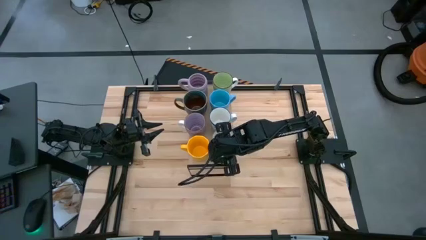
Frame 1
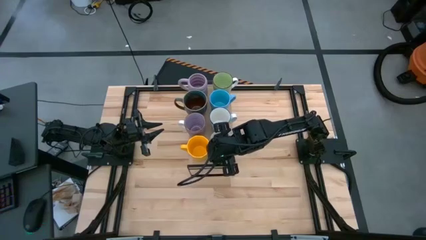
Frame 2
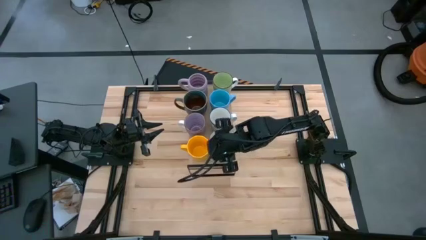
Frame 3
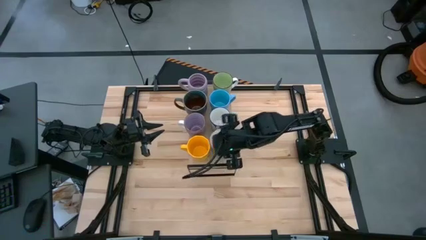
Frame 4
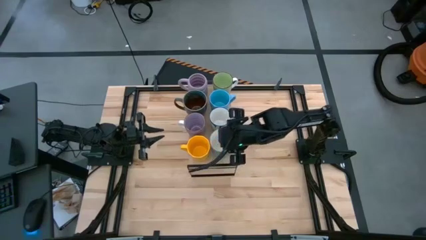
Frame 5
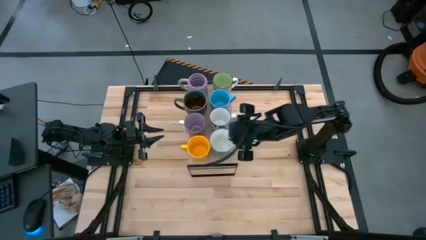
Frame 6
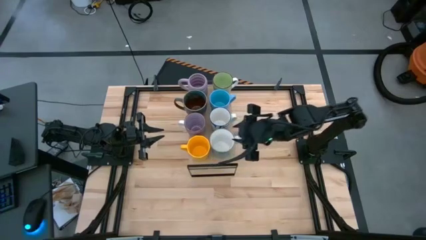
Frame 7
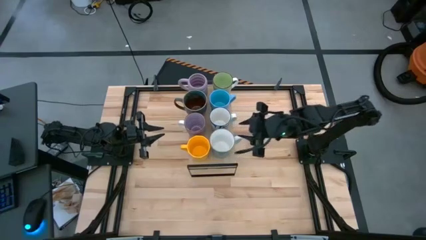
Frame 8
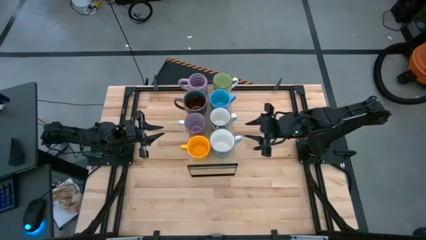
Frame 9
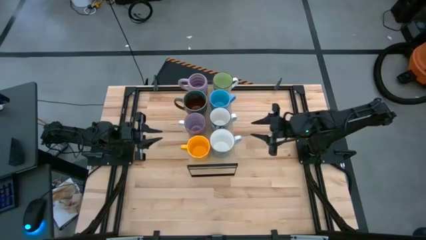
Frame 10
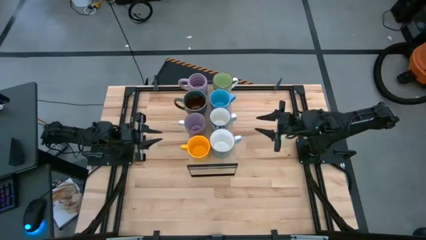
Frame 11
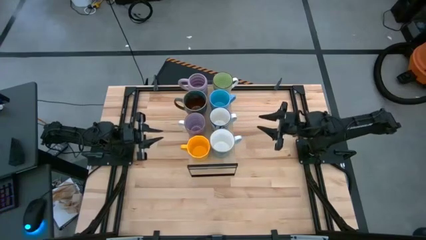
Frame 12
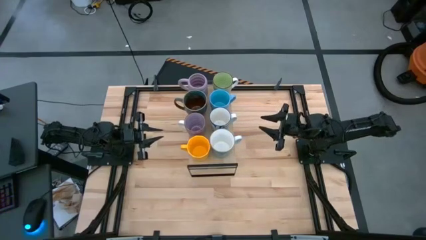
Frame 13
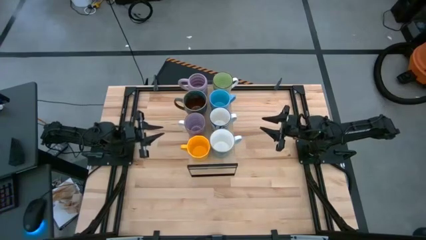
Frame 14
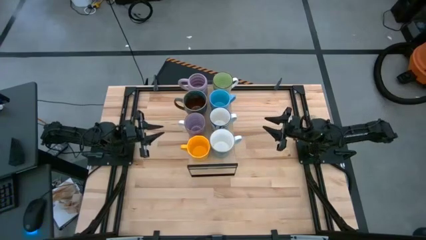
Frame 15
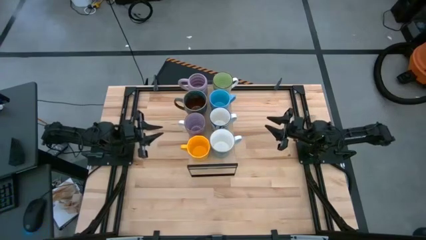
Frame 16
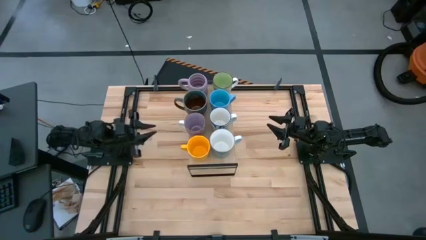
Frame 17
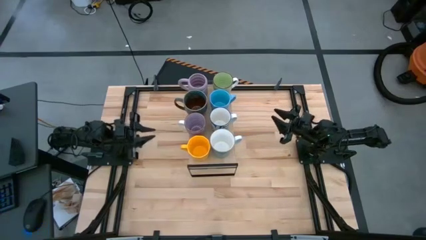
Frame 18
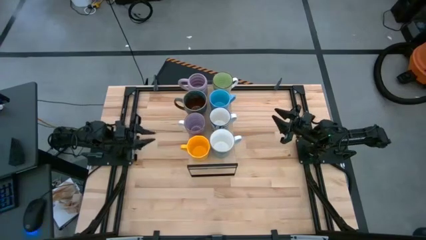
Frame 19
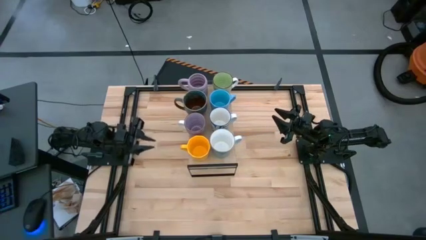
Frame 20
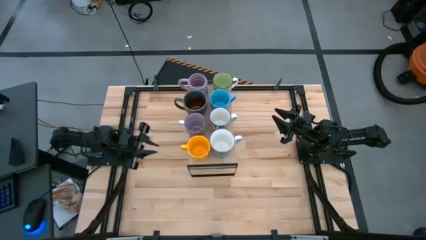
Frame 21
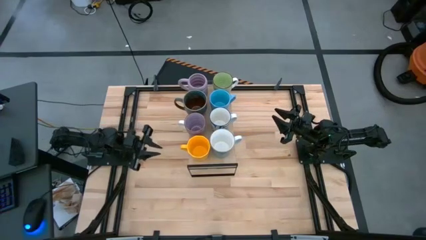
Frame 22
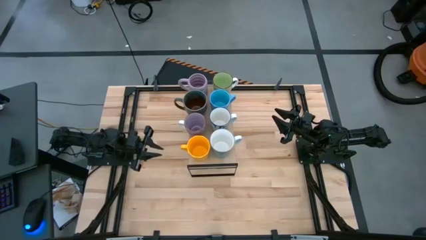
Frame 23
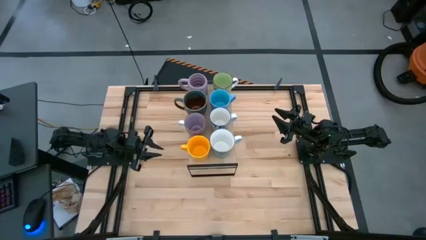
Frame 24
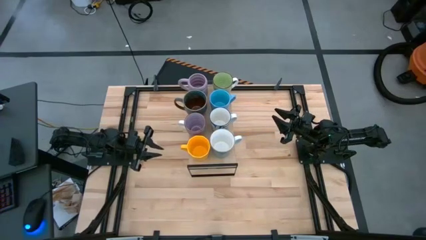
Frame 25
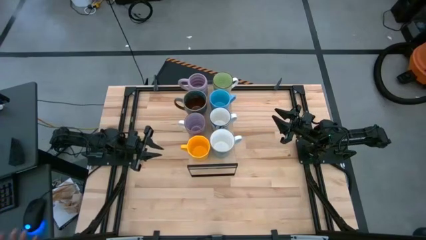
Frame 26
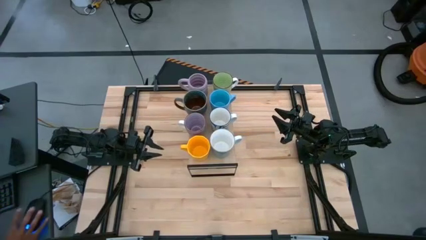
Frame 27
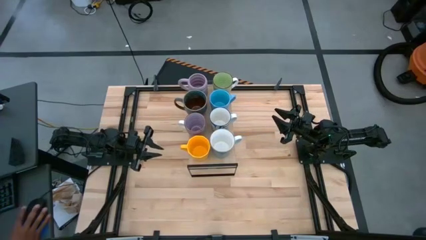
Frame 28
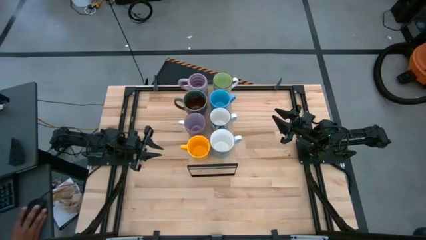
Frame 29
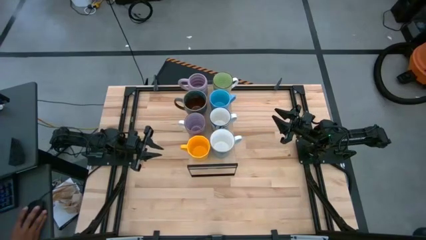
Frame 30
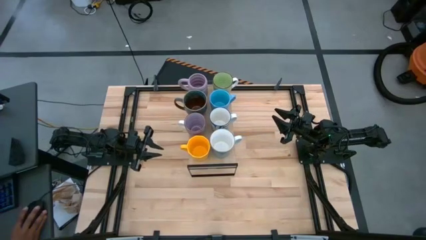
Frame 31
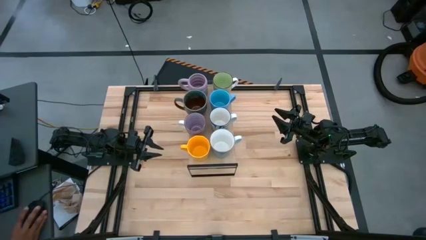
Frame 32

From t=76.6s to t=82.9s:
Task: Place coffee mugs
Return to Home Position

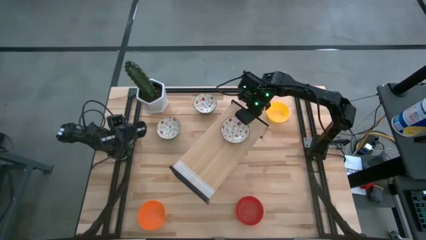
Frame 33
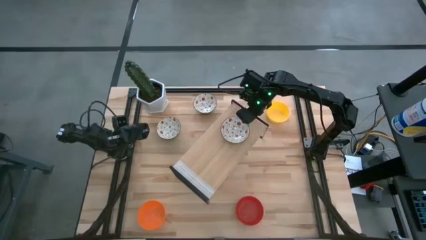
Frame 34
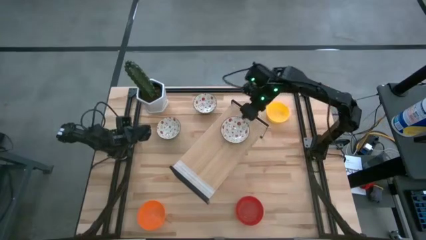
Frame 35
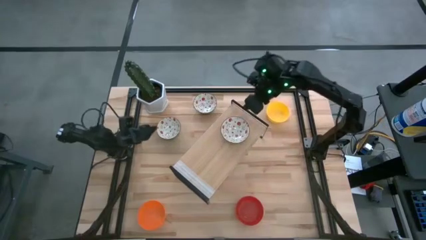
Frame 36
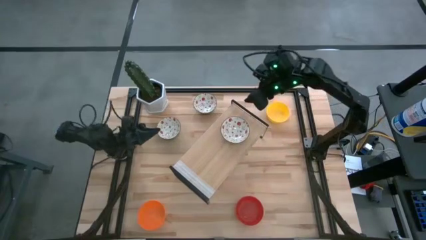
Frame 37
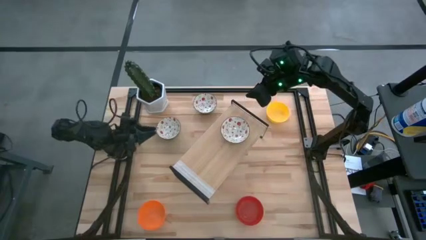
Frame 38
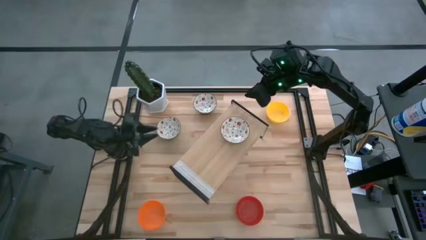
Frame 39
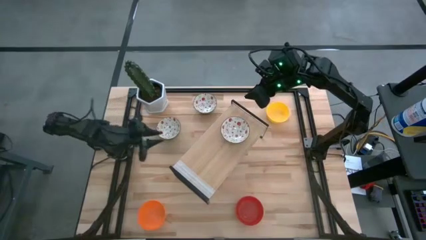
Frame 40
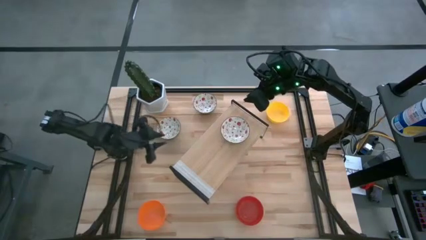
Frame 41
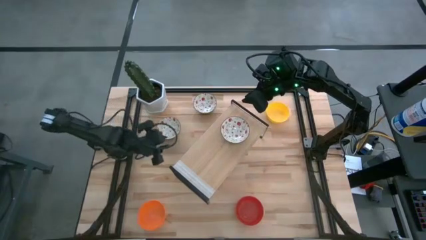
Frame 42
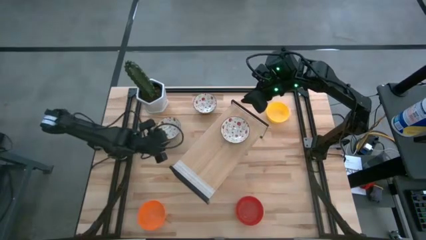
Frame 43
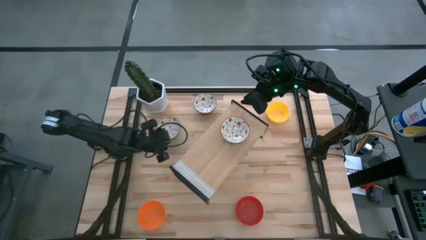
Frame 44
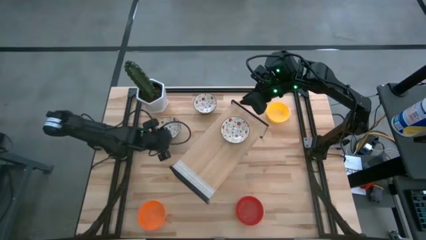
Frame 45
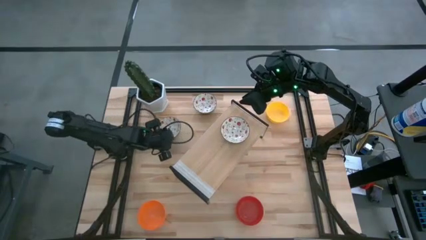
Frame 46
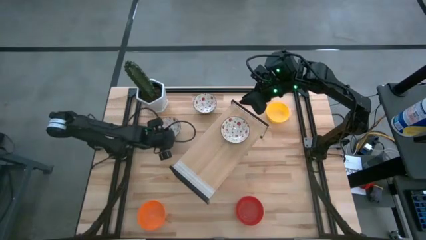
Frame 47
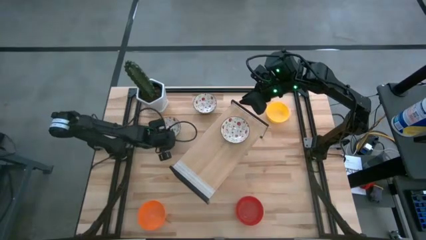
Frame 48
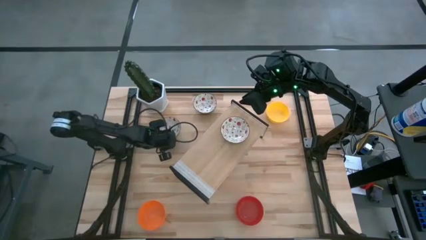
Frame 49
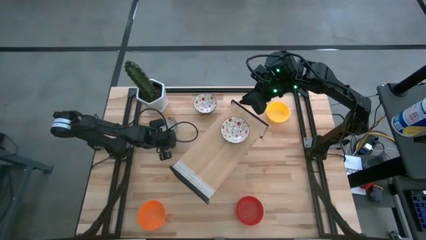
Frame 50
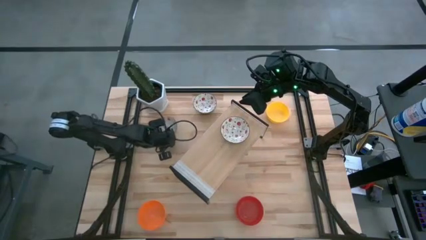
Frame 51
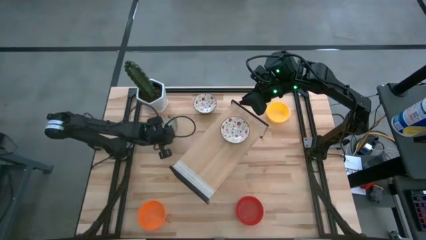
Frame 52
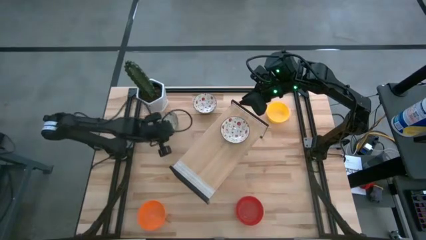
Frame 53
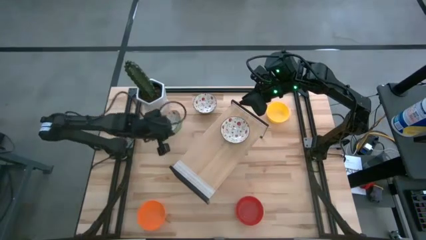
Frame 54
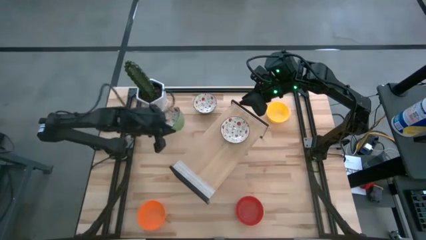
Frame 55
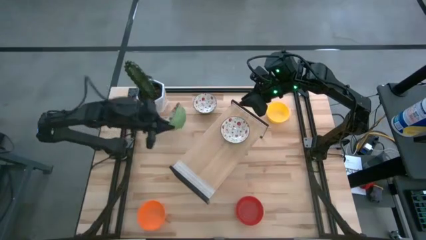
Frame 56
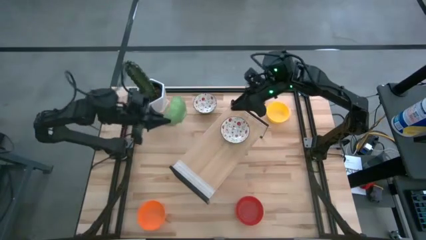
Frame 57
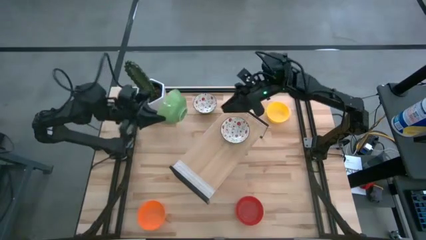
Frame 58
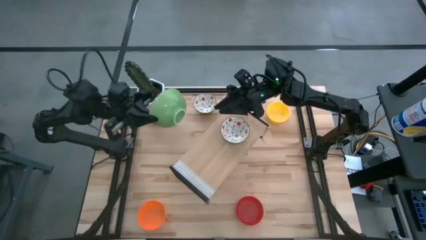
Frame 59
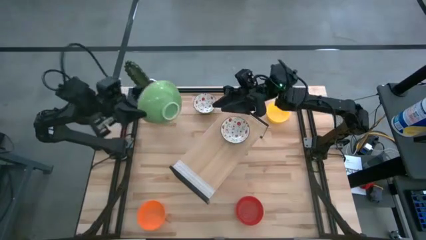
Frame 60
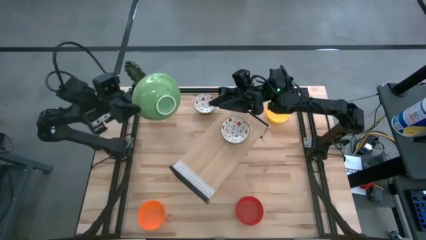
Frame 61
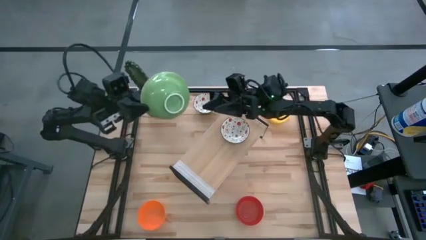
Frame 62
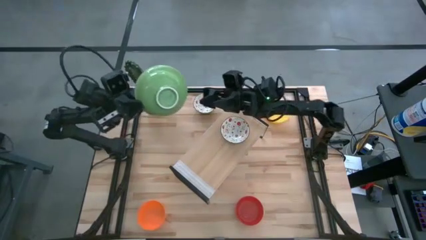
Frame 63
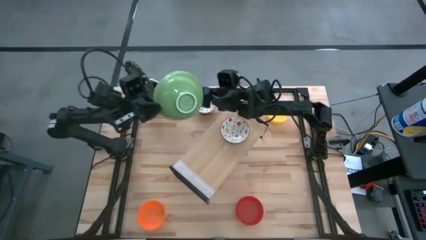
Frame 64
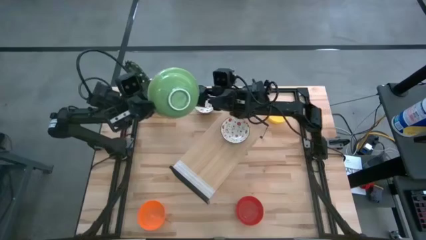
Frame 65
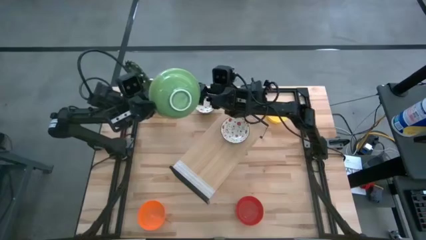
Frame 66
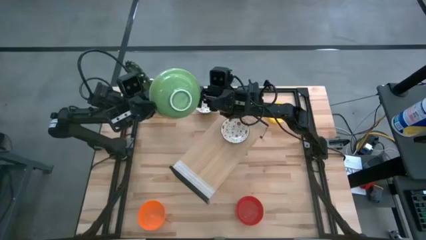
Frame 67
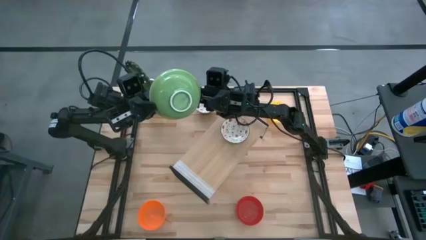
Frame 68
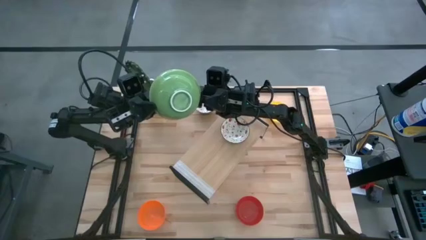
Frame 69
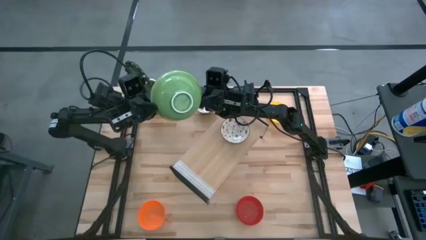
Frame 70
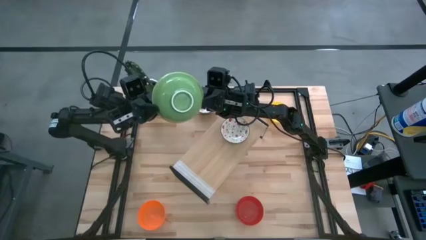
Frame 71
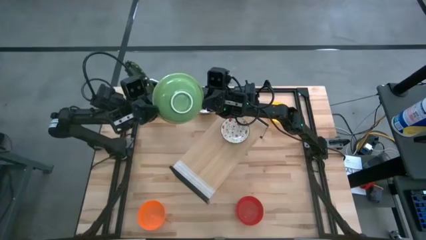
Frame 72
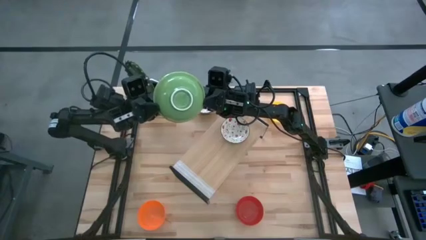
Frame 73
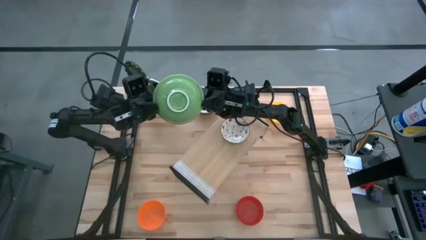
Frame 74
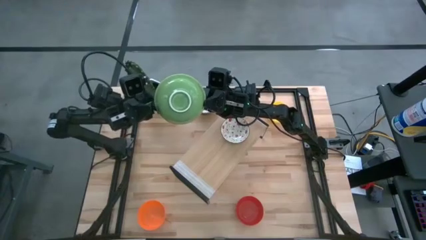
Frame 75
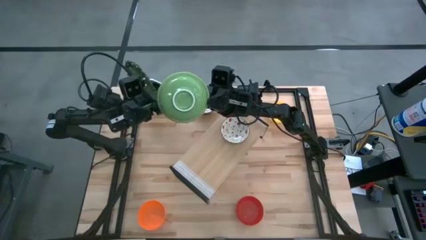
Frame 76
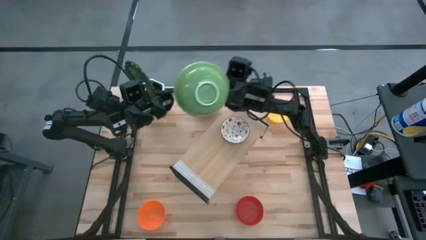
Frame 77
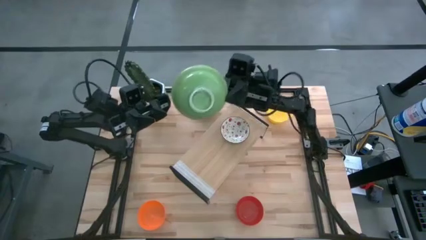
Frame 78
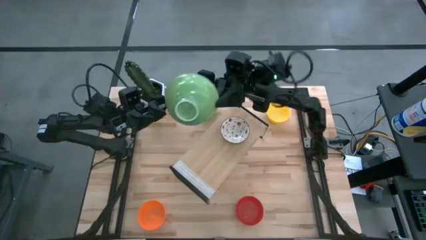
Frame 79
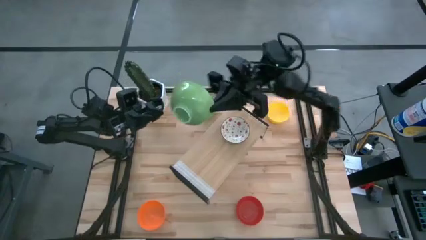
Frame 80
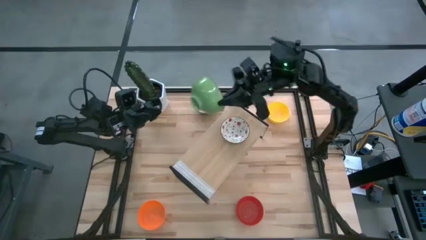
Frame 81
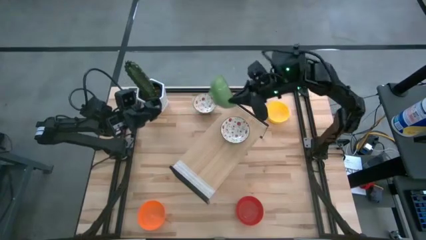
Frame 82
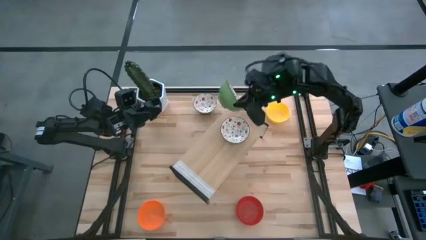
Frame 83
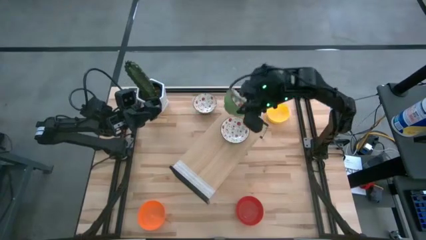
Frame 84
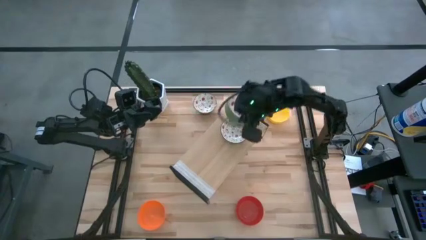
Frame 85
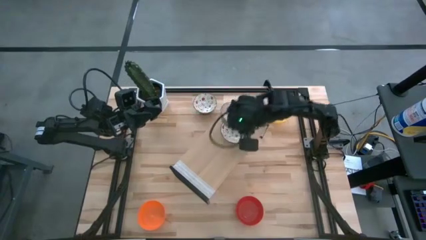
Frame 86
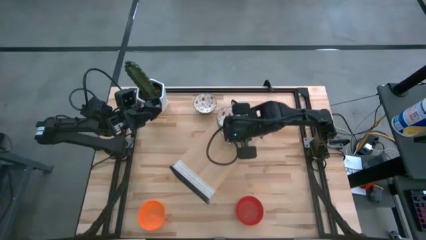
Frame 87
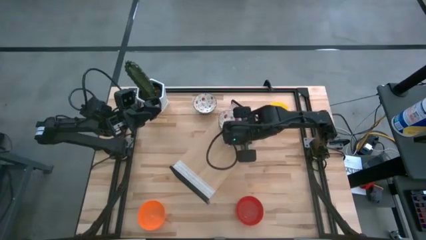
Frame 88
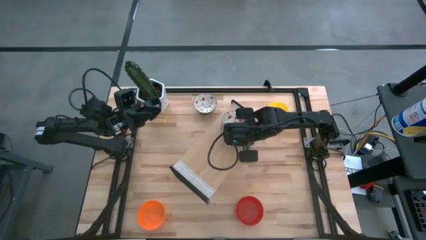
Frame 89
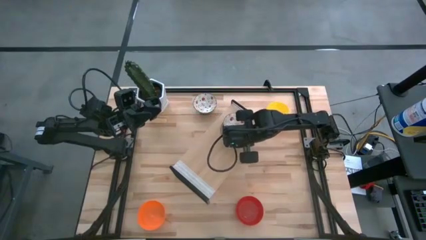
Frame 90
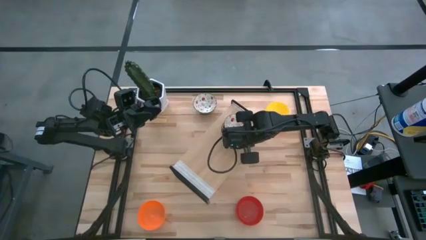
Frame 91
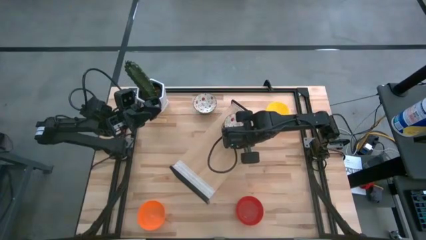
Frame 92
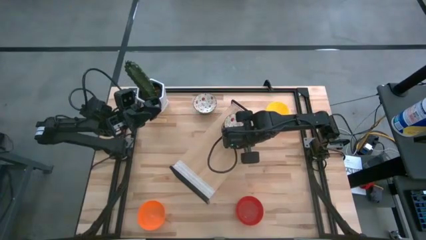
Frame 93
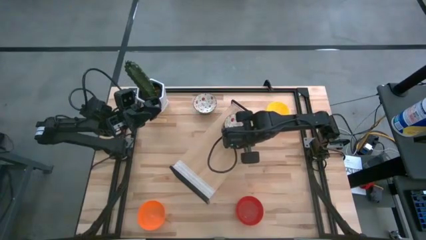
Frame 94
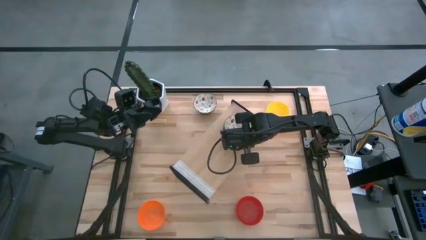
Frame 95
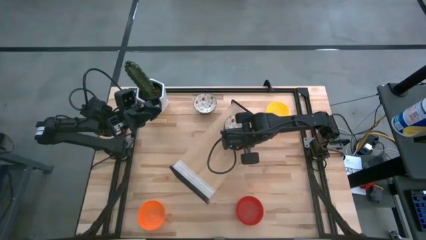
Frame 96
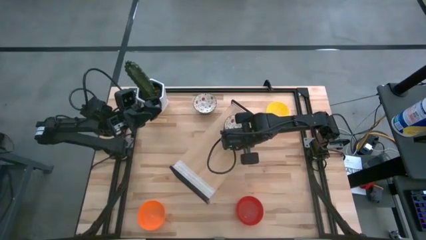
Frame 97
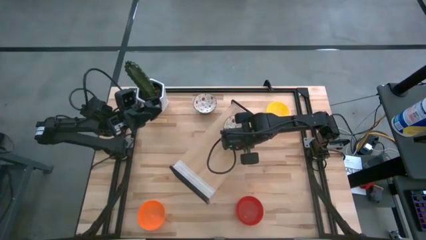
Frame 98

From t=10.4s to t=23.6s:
Task: Pick & Place Mini bowls
Stack the bottom white patterned bowl on the white patterned bowl on the shelf
